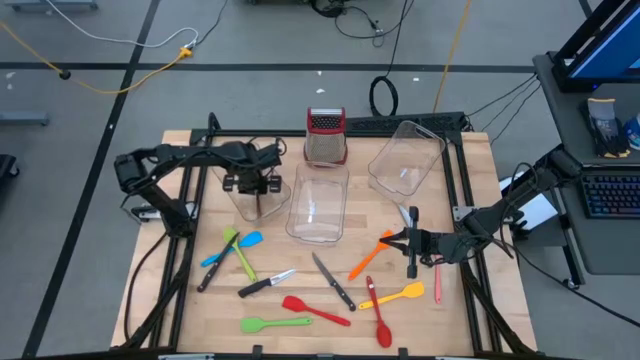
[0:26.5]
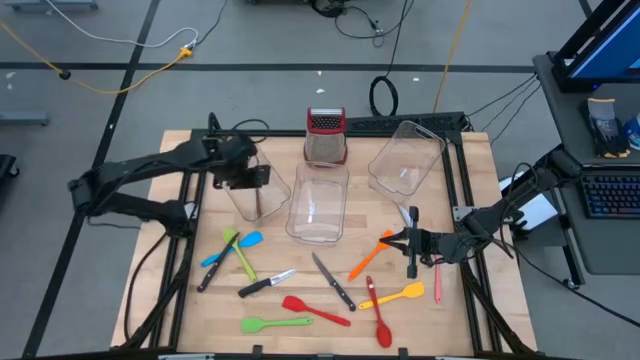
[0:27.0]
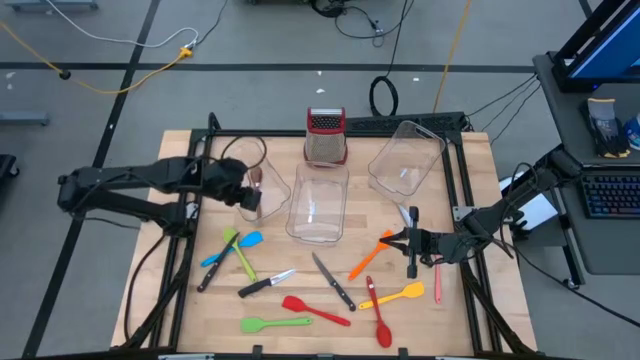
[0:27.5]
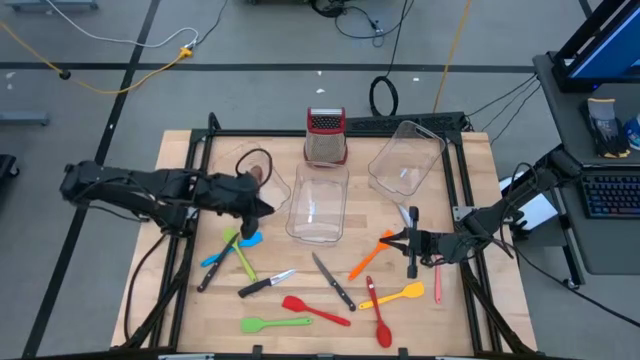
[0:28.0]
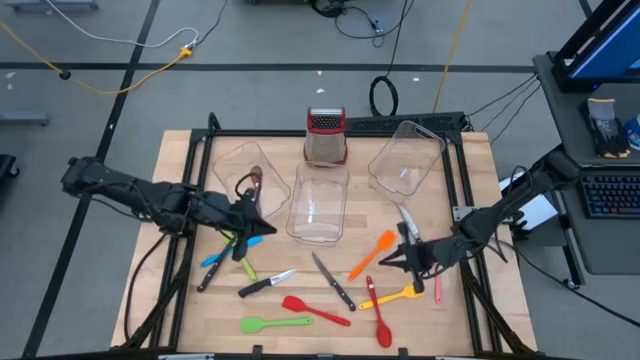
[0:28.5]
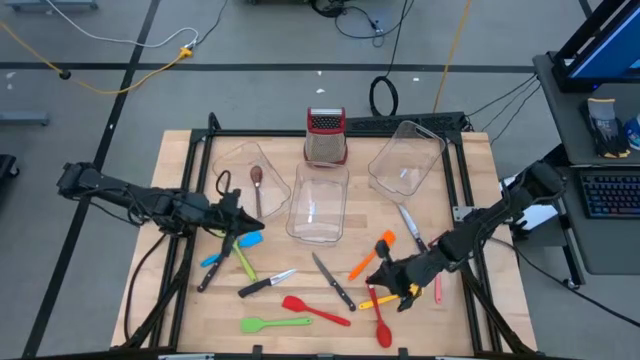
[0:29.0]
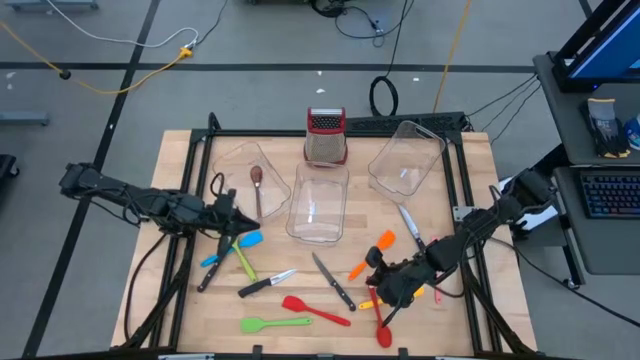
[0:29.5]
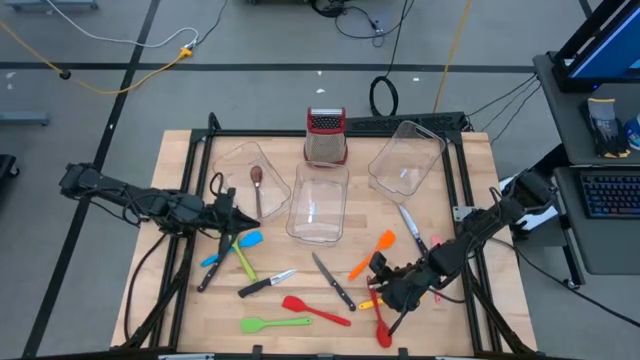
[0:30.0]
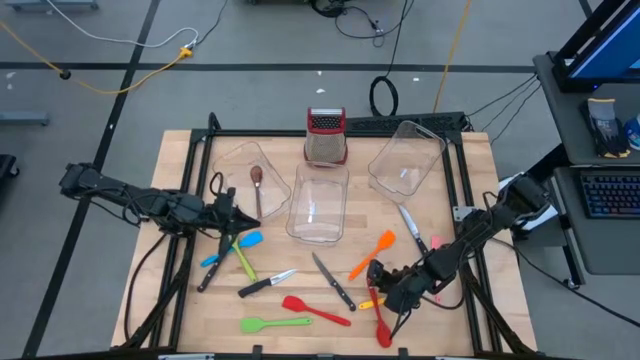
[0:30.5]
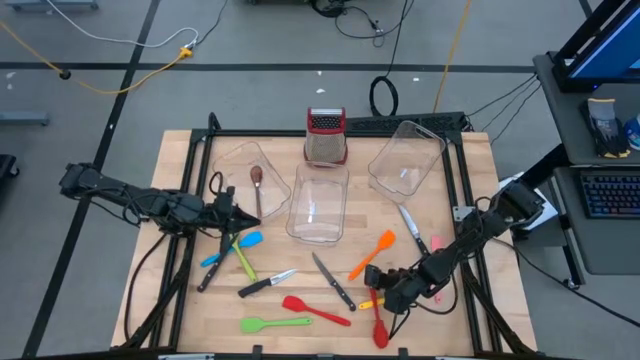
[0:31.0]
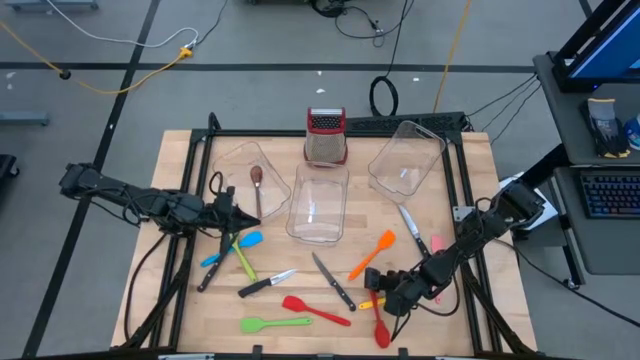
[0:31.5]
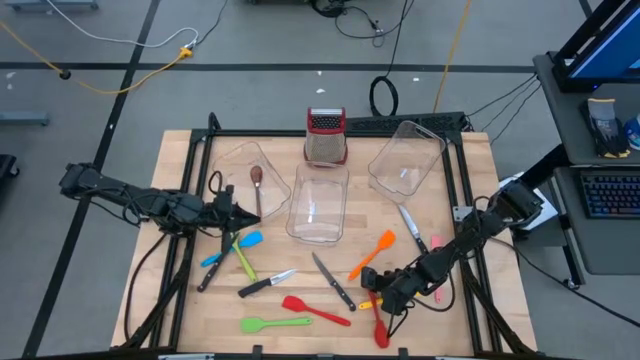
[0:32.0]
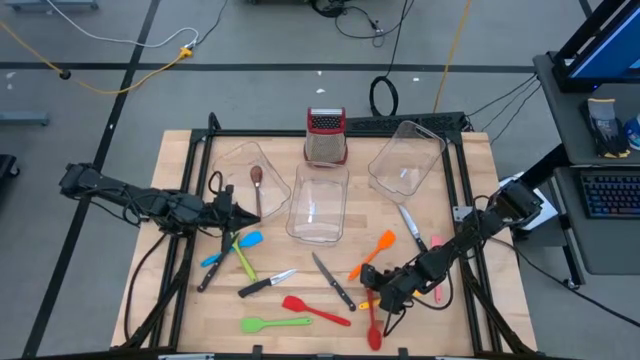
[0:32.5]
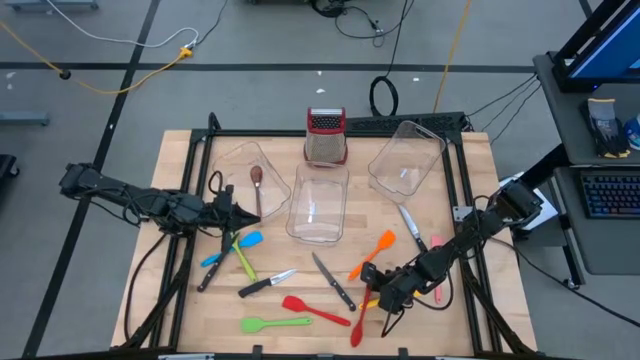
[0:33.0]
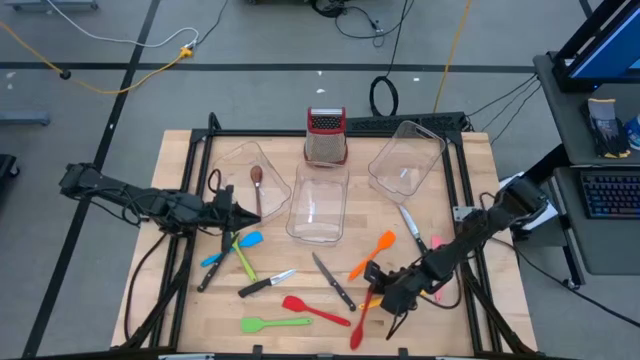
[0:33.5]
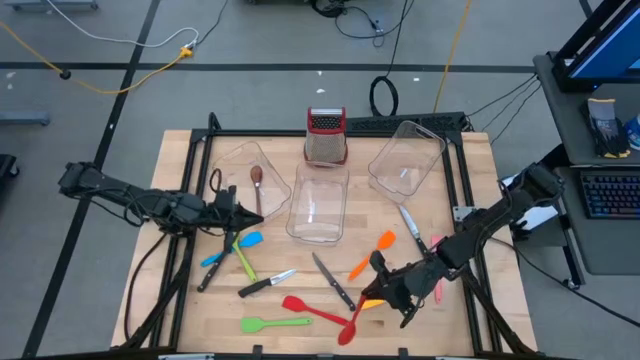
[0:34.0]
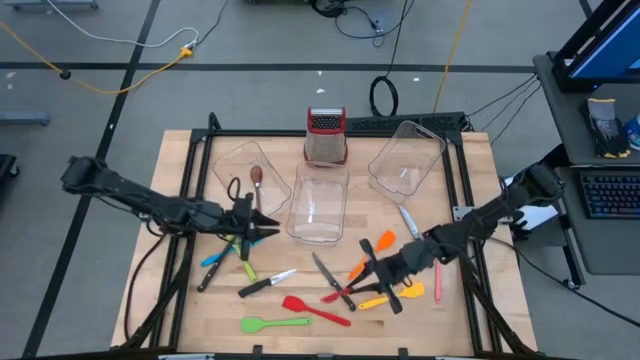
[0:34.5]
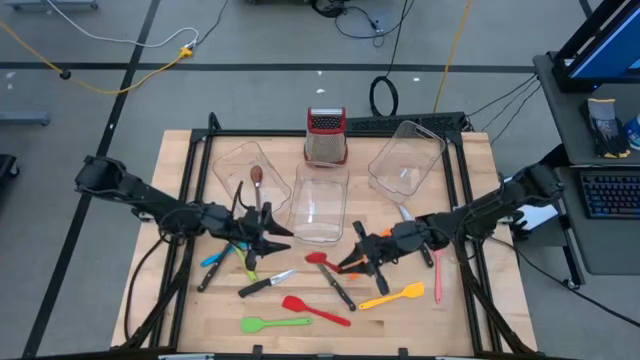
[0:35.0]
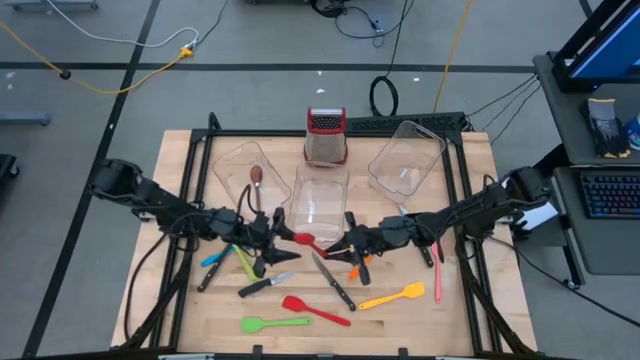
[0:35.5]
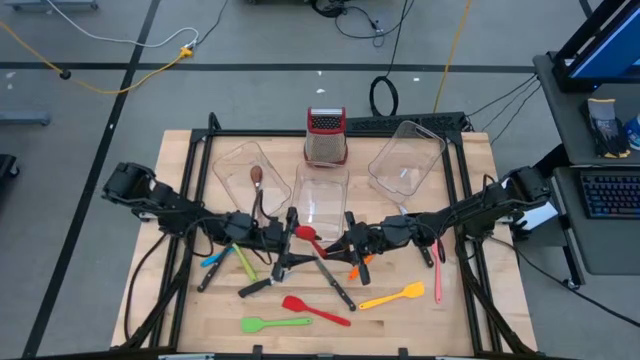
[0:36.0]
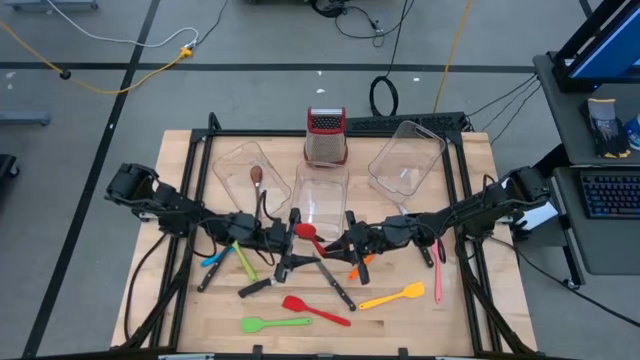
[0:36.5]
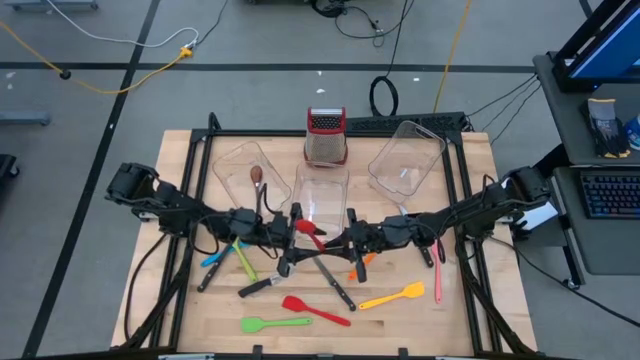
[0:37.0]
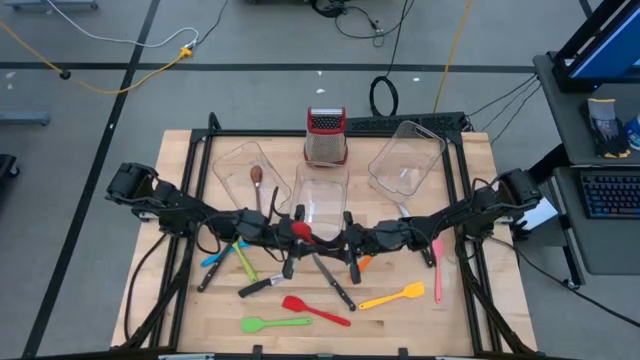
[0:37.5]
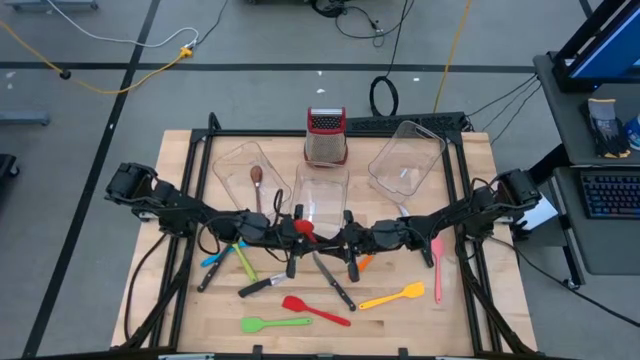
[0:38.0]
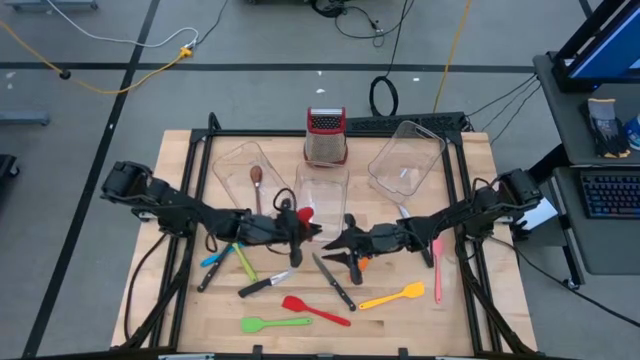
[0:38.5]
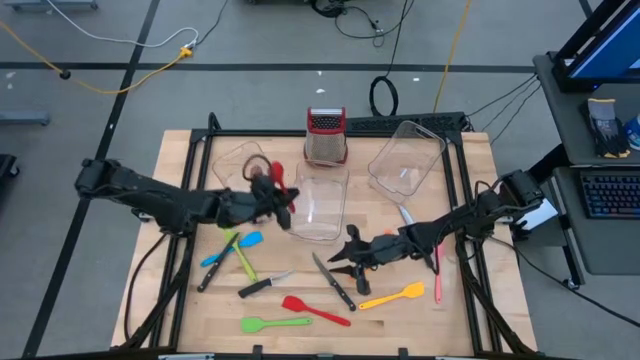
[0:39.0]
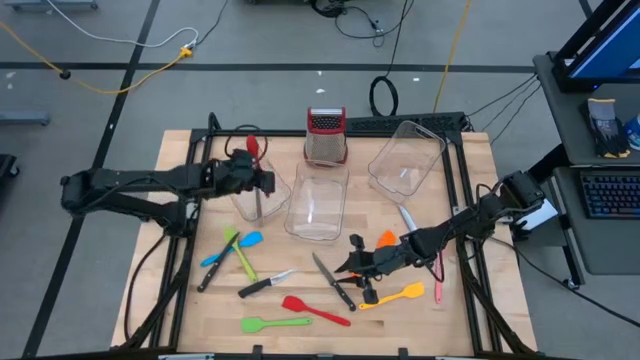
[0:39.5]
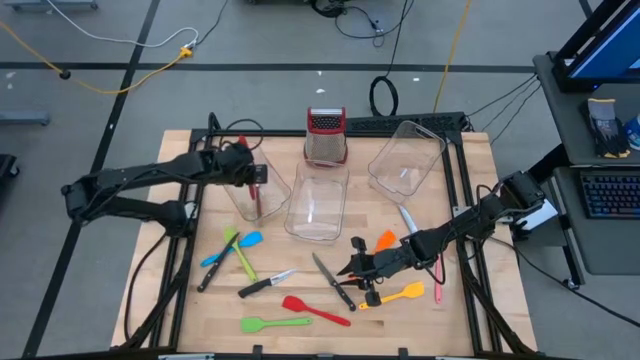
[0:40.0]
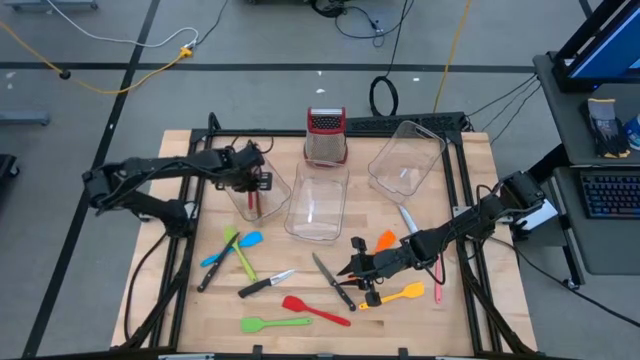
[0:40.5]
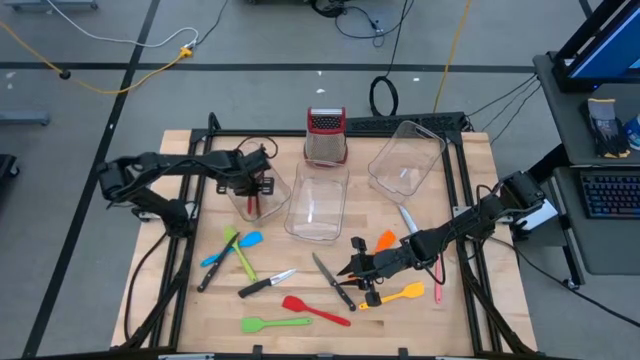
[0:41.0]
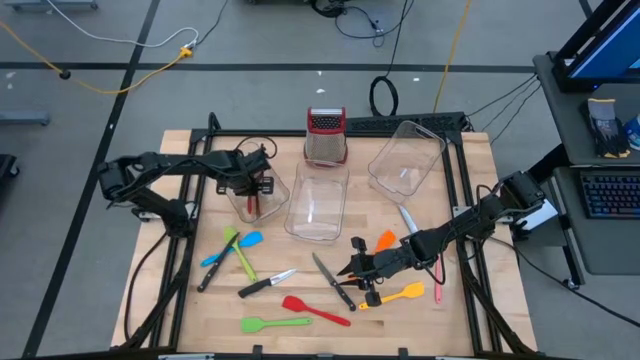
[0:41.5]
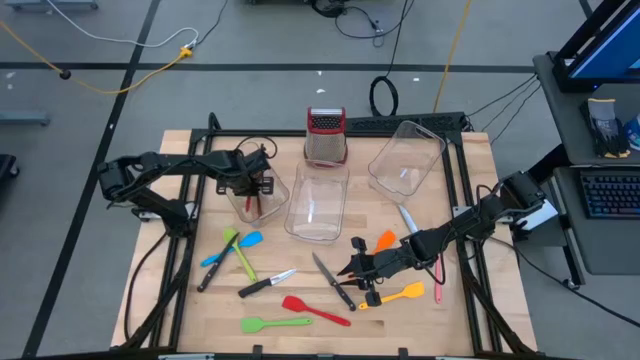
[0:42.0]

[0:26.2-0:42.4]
Task: Pick & Place Kitchen Items
Put the red ladle into the left transparent bin

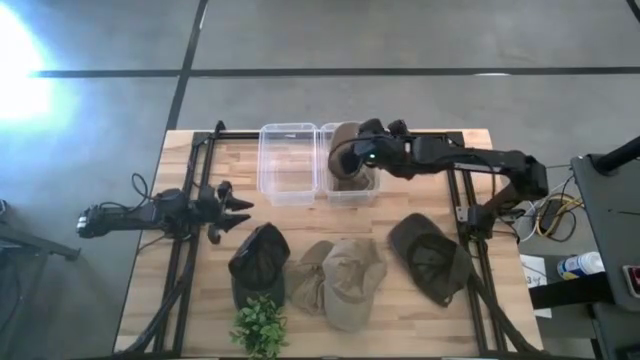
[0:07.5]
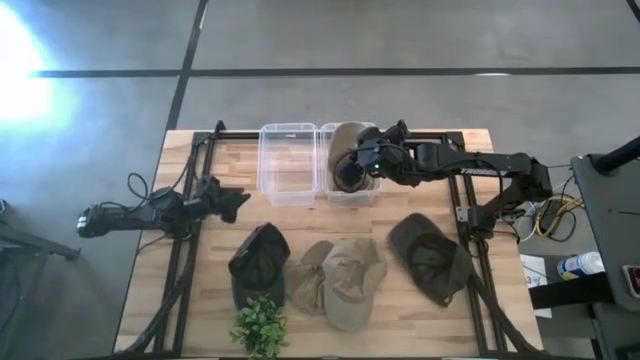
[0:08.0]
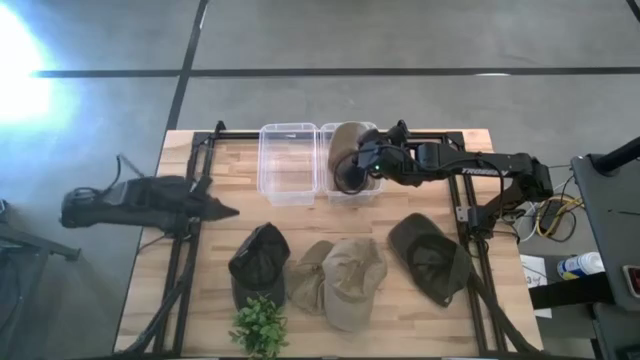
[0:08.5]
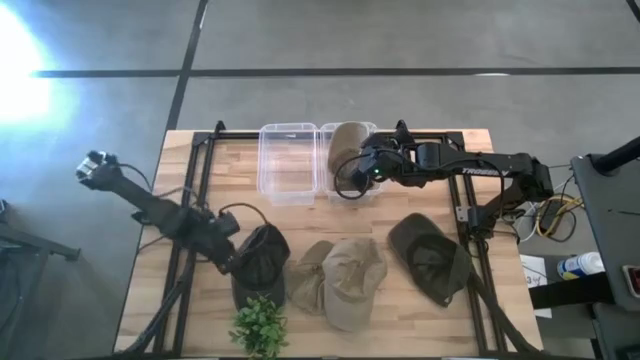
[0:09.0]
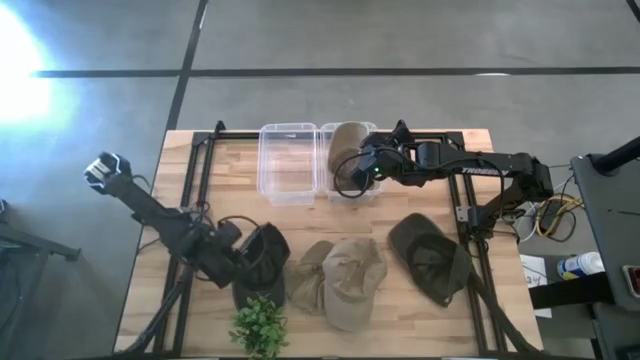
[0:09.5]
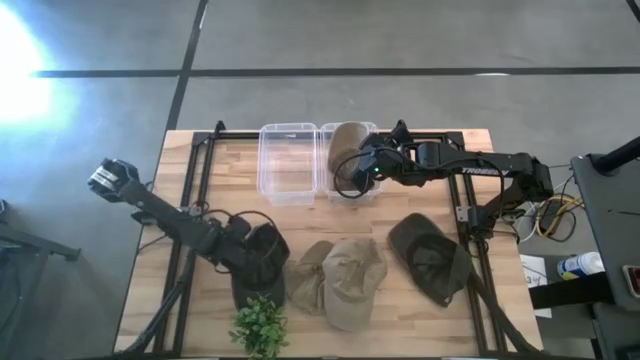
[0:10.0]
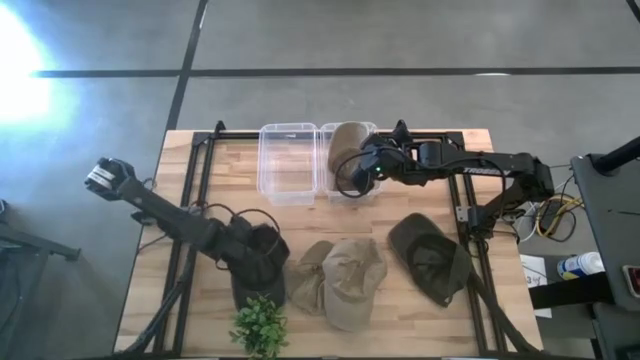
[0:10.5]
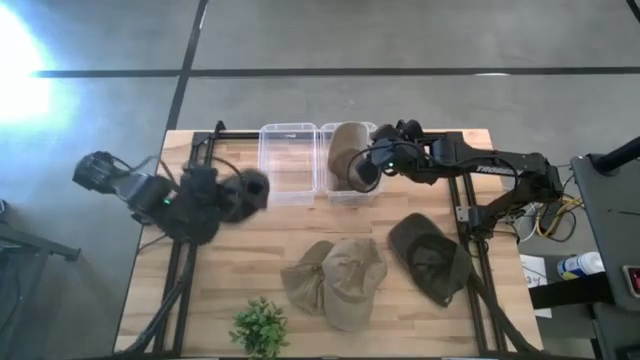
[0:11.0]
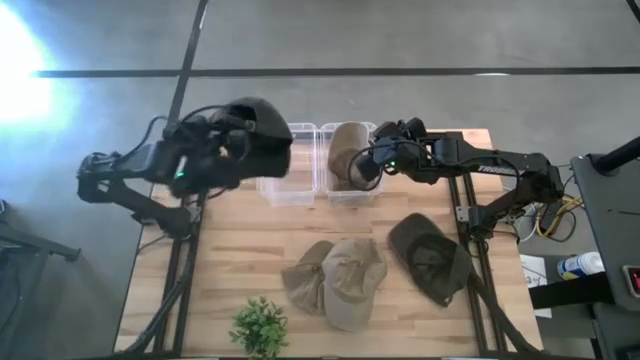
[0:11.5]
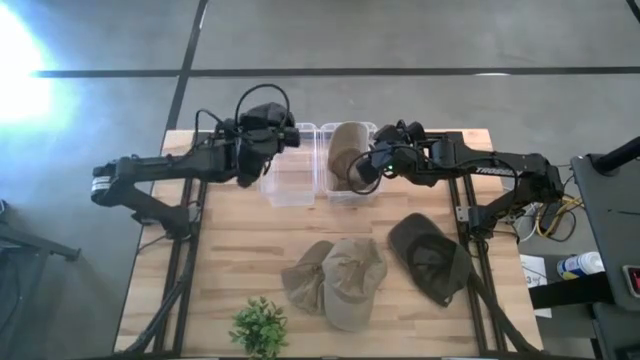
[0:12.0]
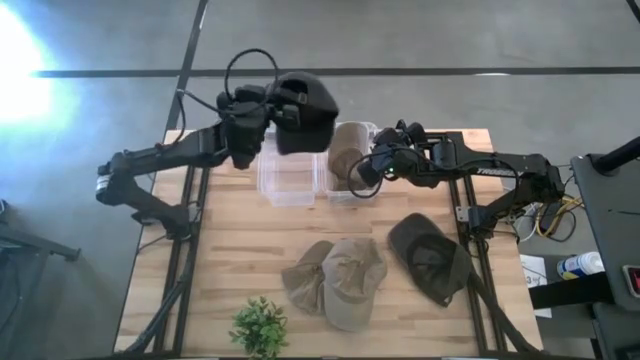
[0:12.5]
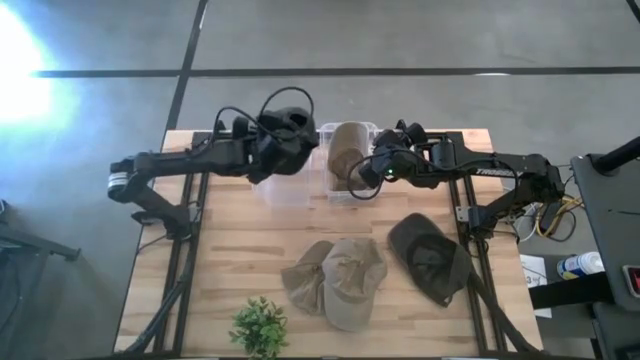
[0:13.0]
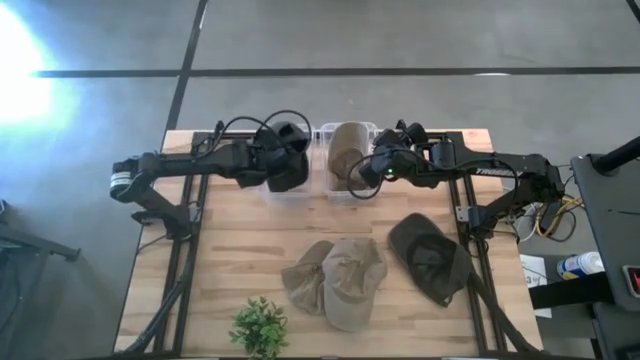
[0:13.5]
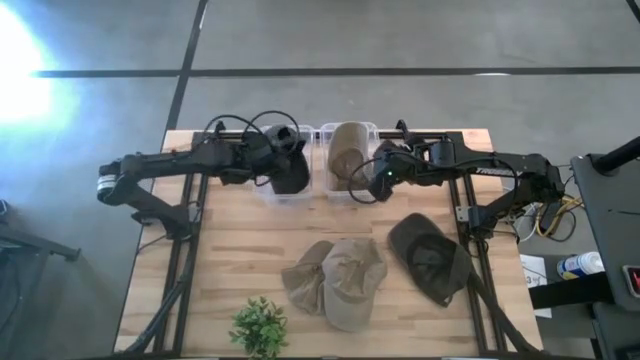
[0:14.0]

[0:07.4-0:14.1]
Task: Pick & Place hat
Put the left black cap into the left transparent bin
